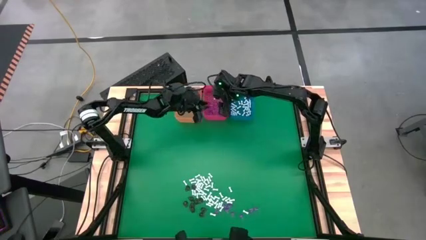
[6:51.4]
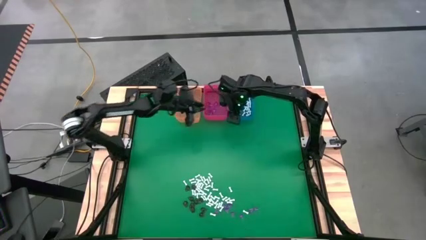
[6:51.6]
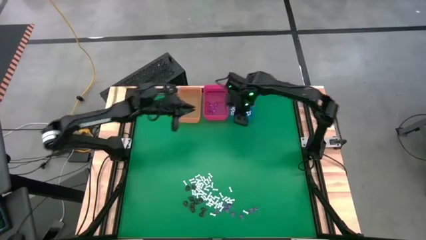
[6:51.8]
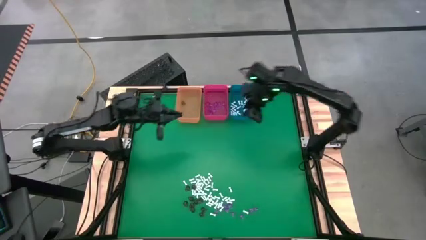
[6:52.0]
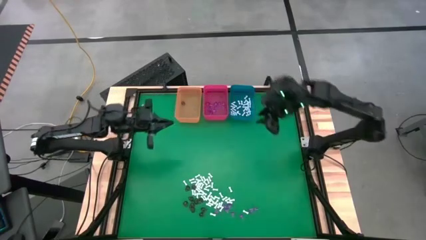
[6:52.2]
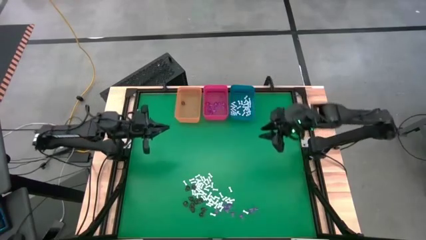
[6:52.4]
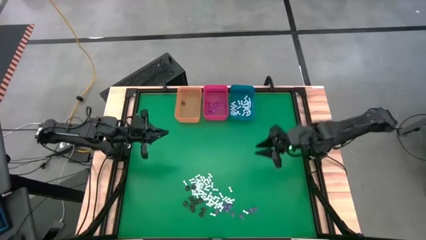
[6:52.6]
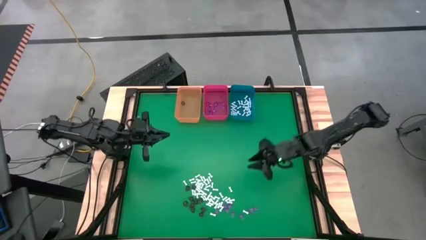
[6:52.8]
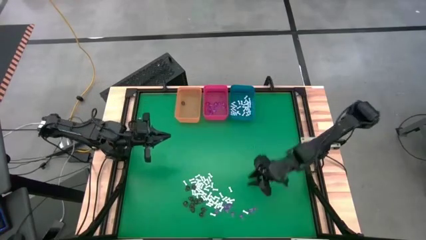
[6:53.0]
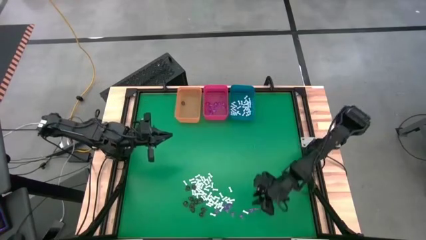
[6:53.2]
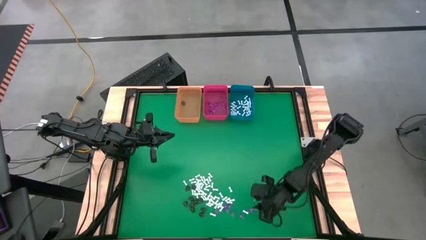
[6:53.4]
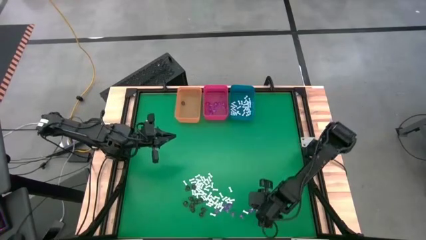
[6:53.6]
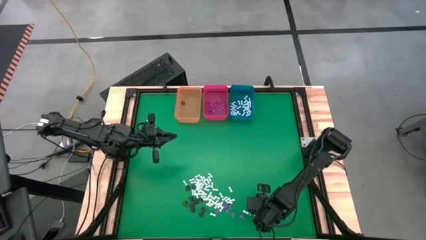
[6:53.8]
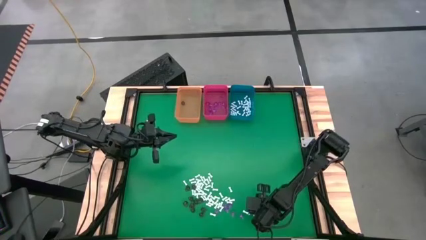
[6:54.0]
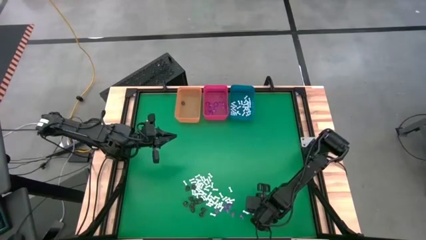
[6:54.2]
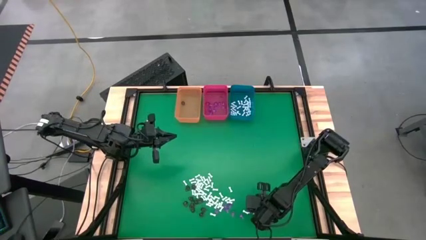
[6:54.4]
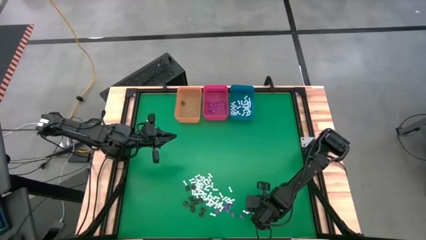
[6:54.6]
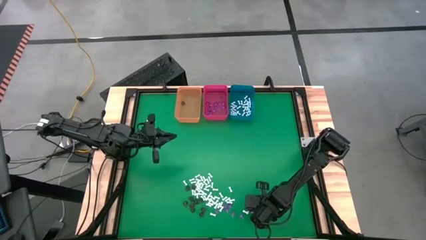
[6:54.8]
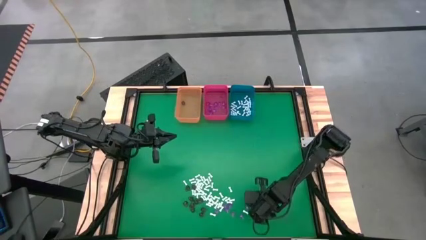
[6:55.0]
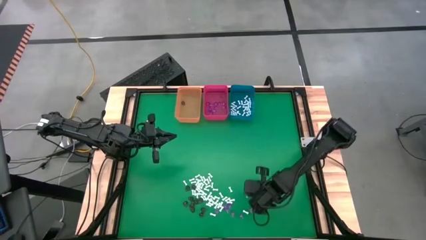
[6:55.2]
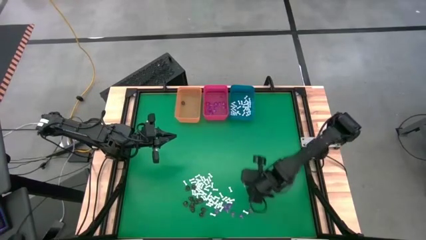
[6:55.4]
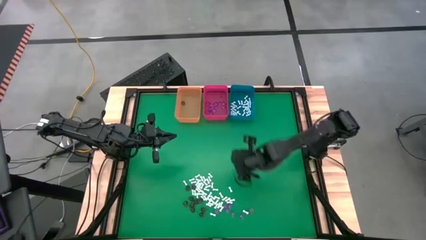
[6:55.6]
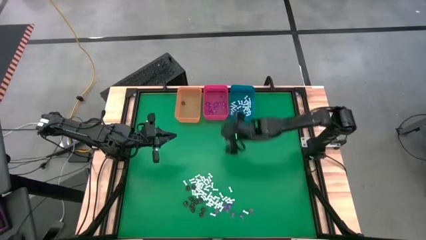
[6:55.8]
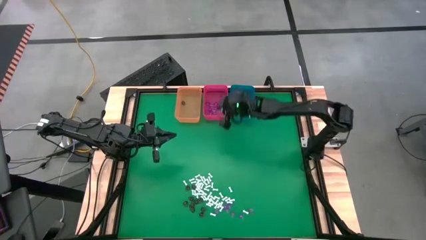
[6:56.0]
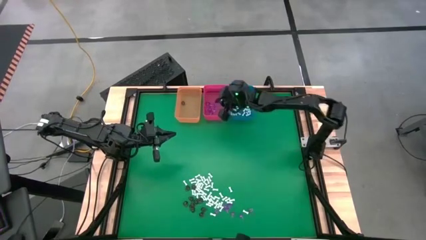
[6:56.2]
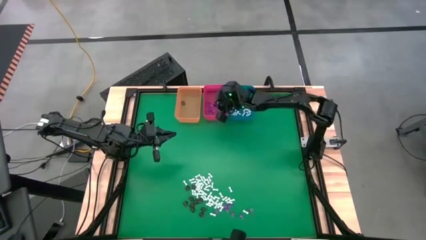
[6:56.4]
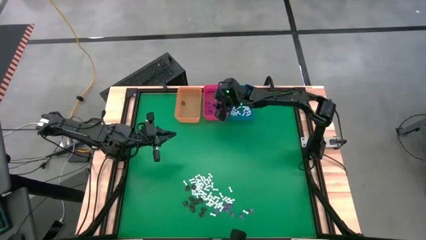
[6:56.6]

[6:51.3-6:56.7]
Task: Sort Halloween decoration
Put the violet witch hat toy into the red bin

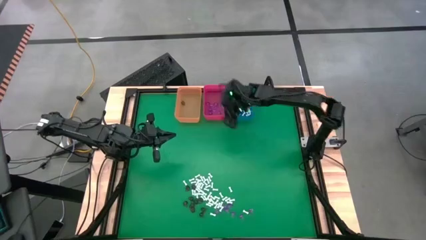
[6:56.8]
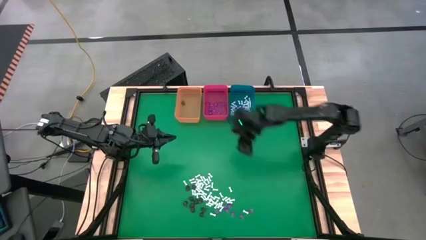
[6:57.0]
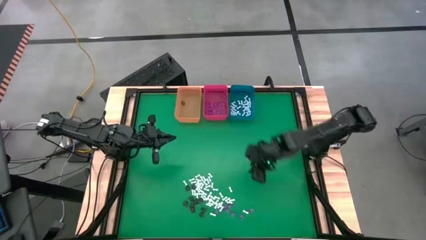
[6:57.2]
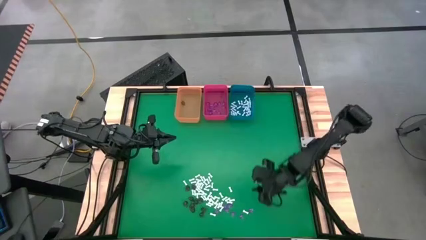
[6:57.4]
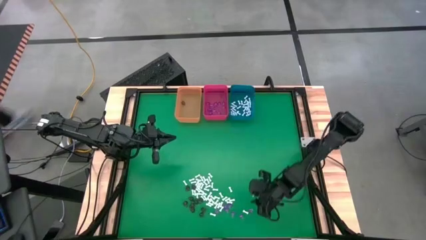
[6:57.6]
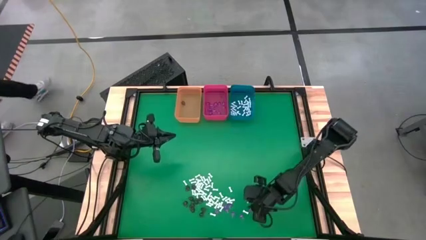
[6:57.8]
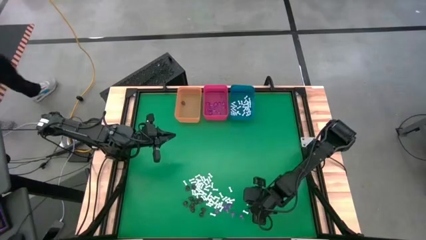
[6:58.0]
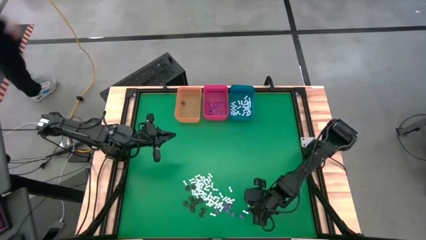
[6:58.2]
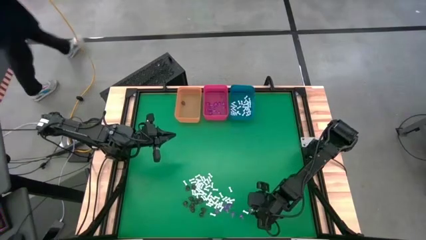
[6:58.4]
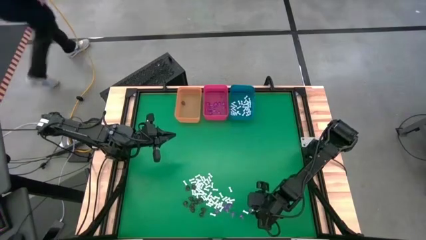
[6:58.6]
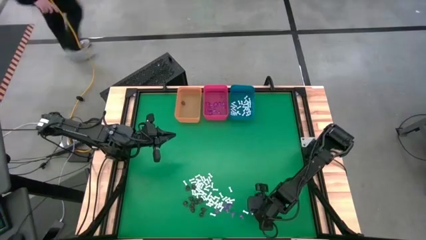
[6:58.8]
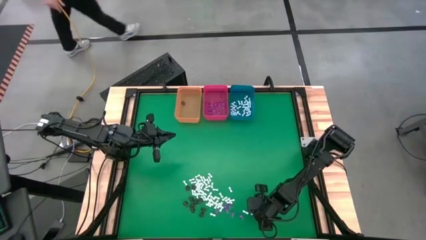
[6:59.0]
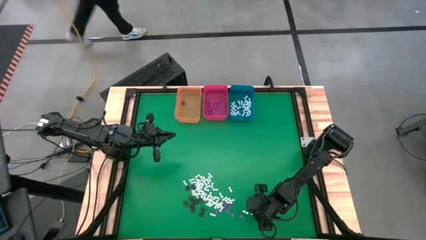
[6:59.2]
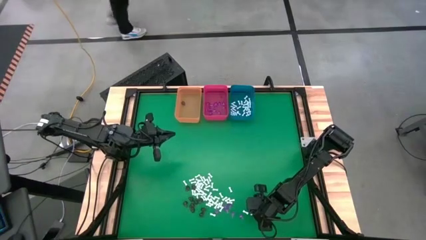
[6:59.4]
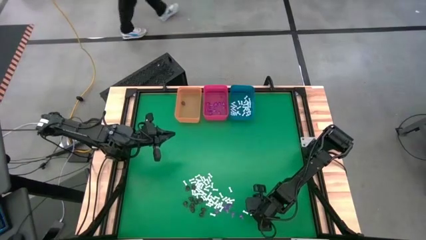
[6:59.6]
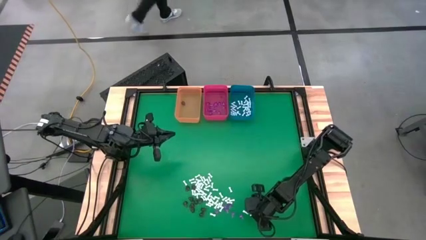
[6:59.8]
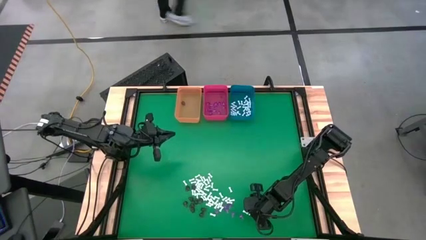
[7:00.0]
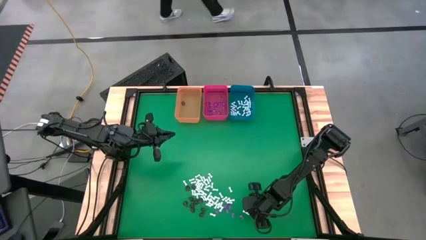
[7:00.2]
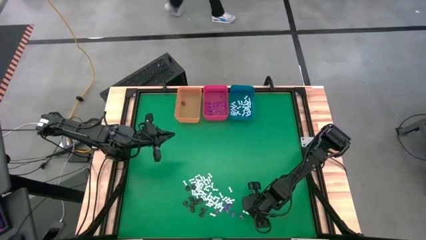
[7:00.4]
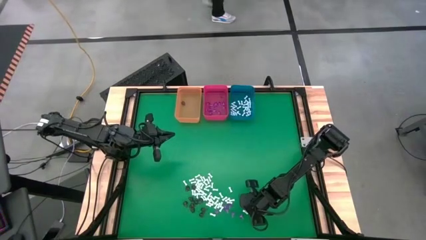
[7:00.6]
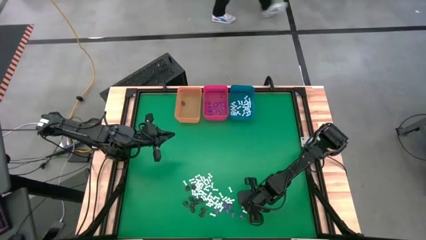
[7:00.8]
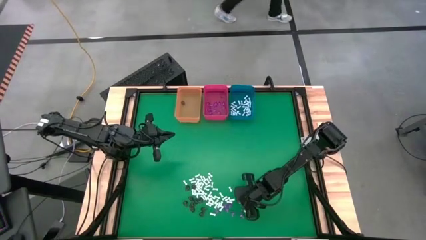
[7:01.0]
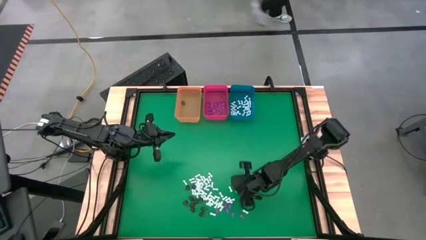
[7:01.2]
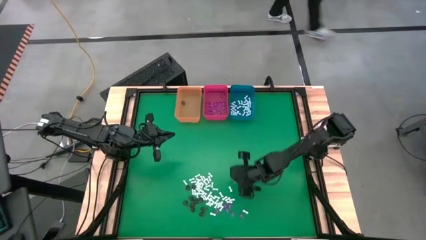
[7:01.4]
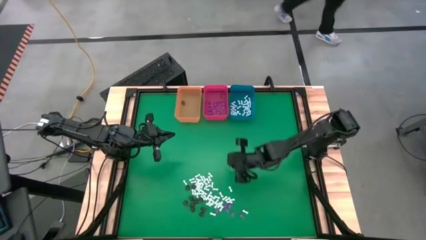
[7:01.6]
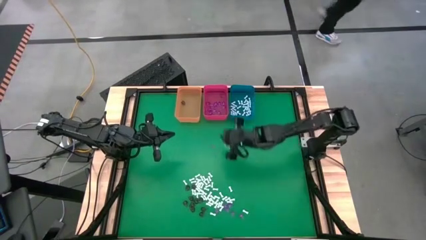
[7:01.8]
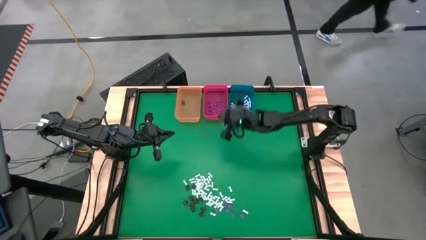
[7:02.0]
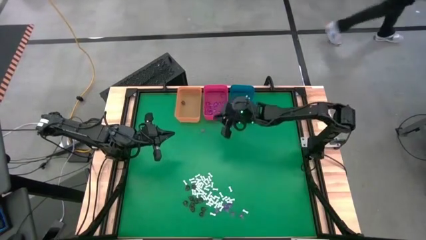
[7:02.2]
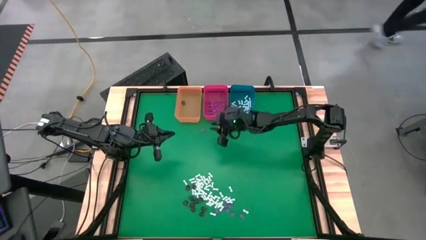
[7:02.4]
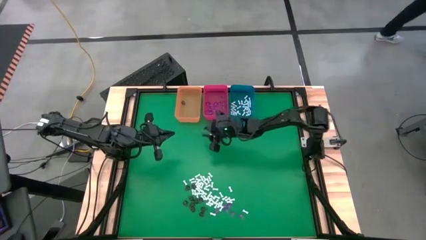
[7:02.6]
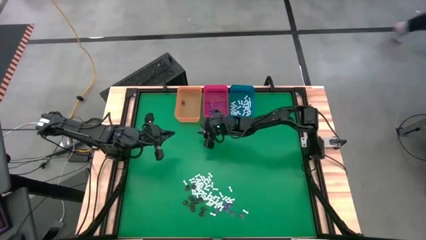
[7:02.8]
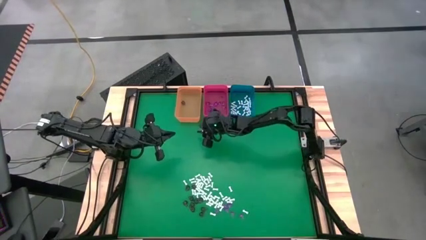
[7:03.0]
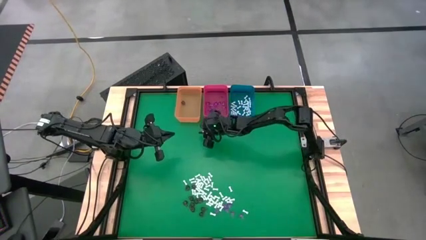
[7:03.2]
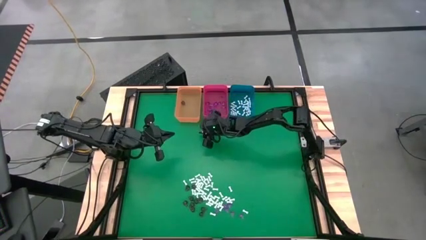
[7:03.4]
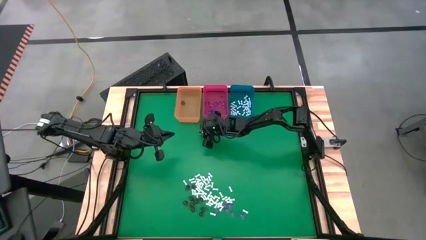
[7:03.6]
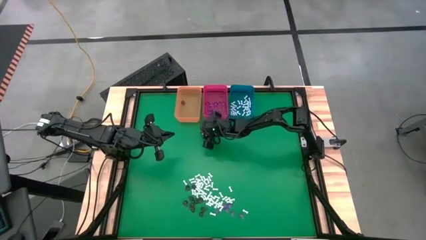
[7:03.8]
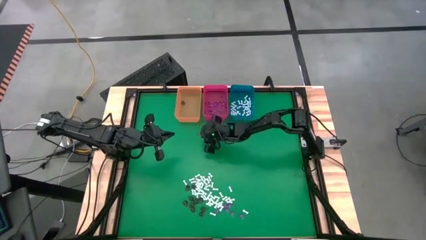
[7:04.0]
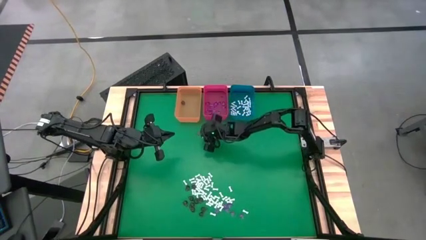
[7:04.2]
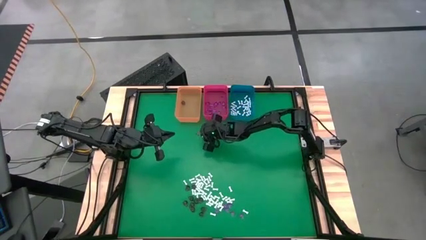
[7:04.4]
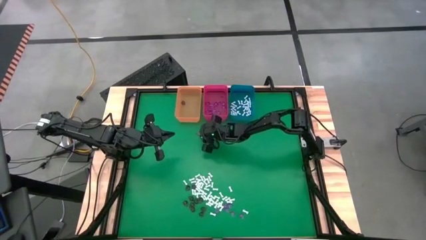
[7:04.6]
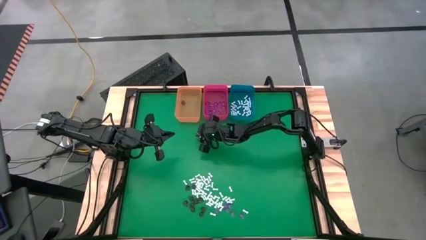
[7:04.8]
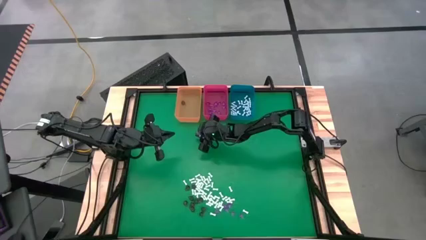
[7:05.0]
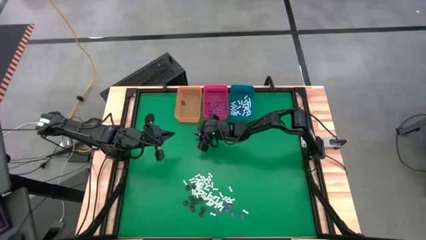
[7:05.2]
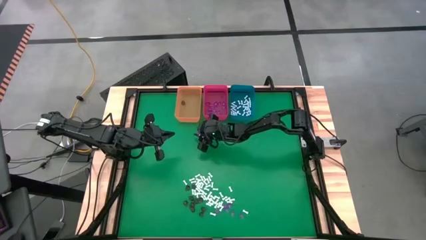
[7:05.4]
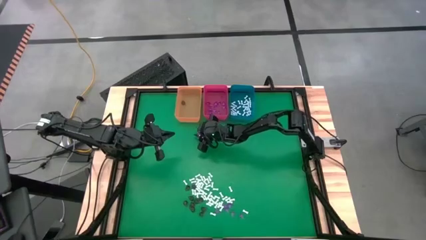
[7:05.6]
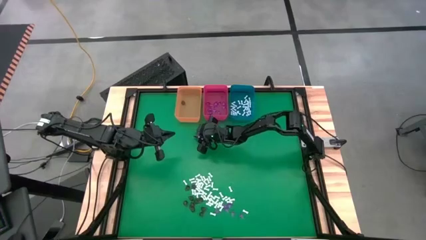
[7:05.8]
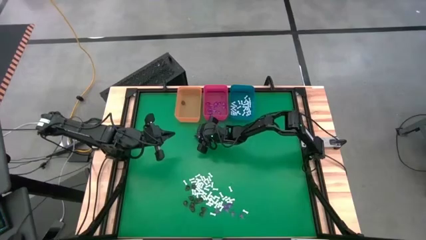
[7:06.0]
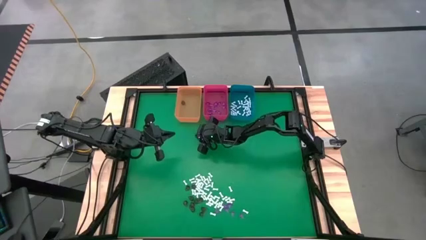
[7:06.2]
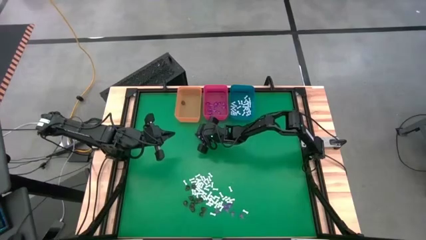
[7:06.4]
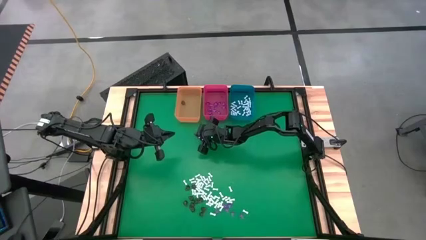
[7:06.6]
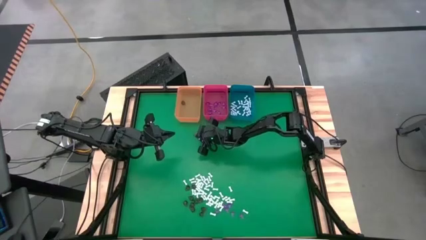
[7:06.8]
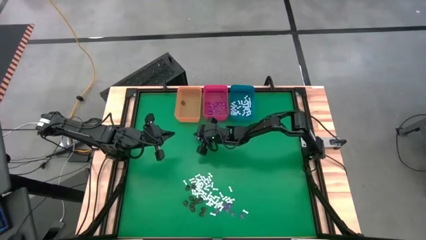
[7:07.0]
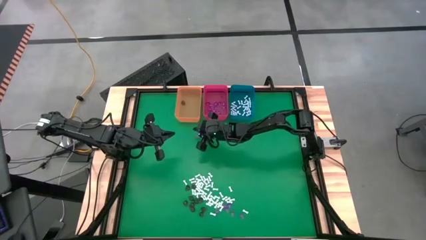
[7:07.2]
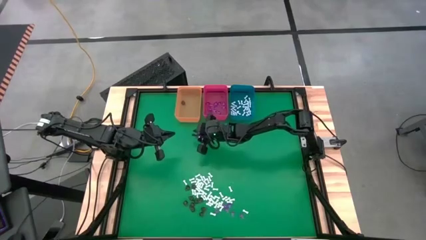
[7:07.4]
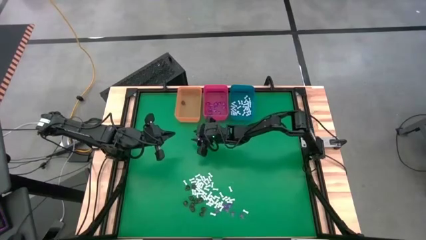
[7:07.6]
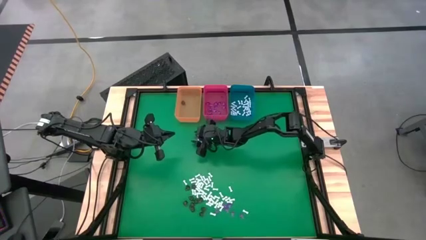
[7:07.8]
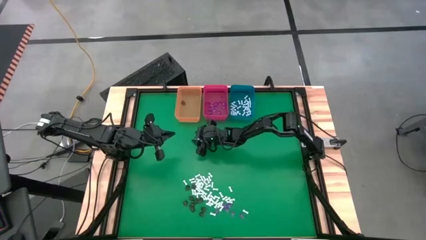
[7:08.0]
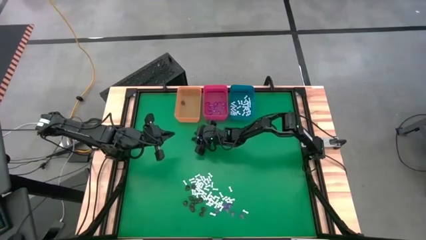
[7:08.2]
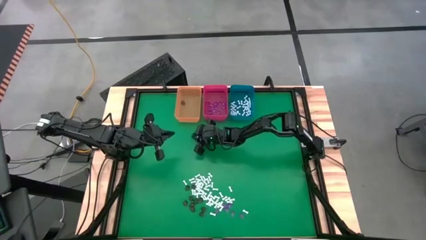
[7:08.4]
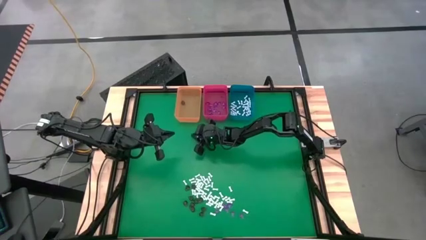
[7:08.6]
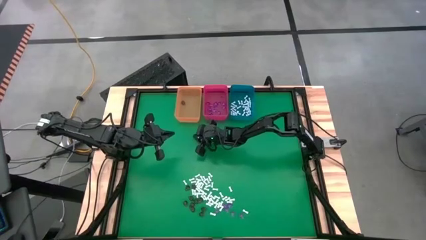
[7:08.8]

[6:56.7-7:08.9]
Put the violet witch hat toy into the red bin

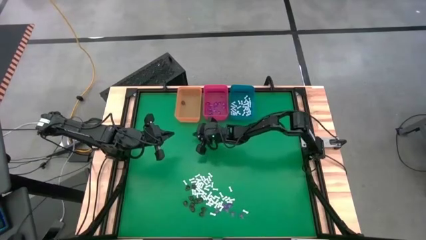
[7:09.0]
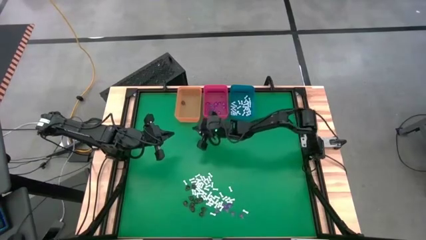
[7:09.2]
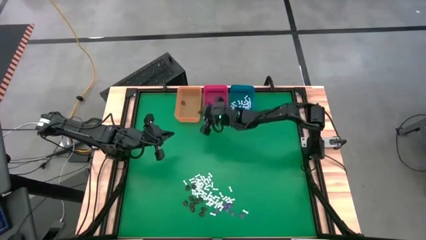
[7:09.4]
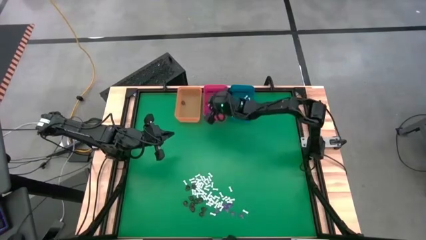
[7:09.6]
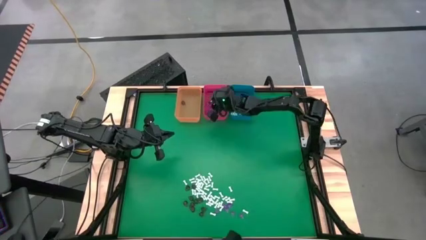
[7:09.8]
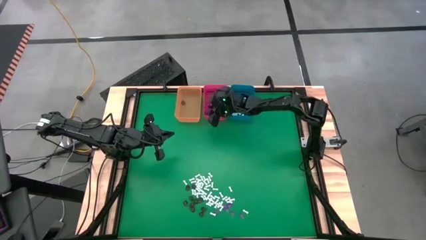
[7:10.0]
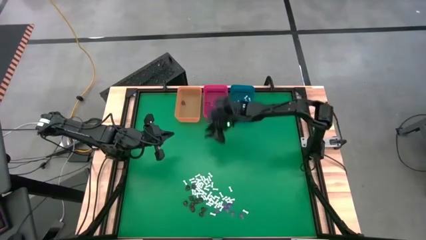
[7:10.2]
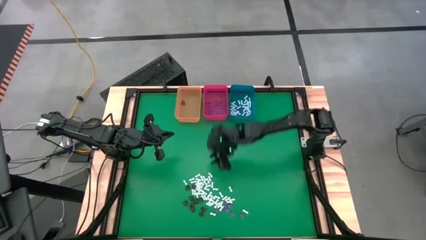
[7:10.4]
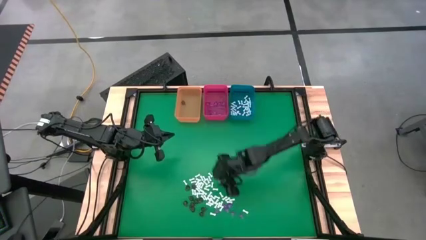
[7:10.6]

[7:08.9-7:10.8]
Put the violet witch hat toy into the red bin
